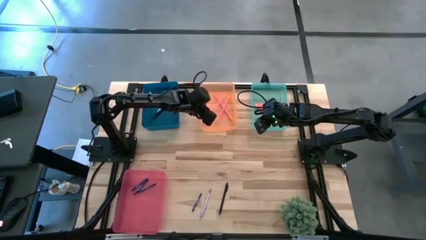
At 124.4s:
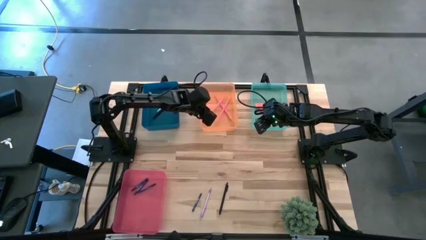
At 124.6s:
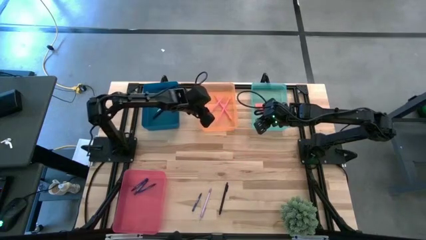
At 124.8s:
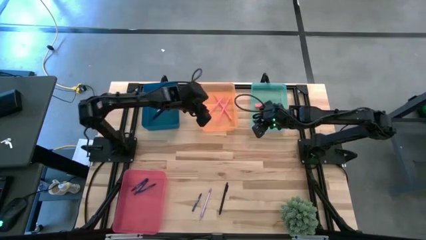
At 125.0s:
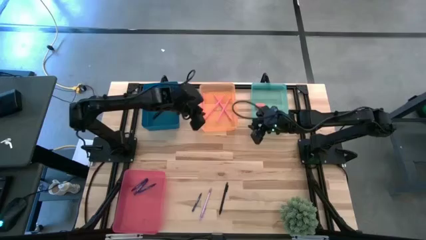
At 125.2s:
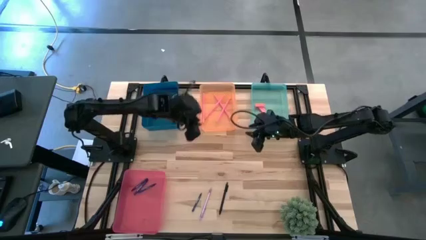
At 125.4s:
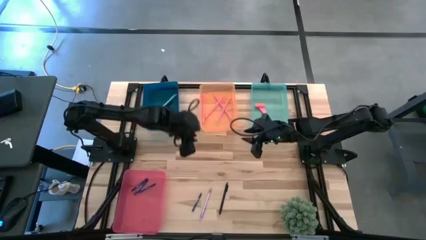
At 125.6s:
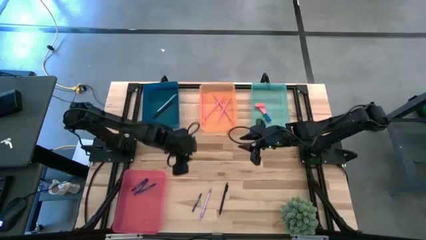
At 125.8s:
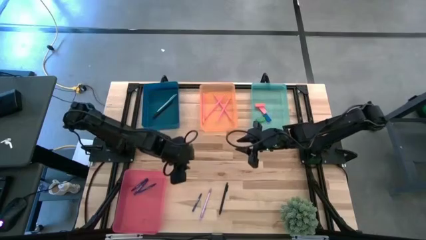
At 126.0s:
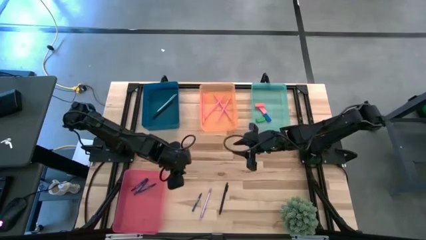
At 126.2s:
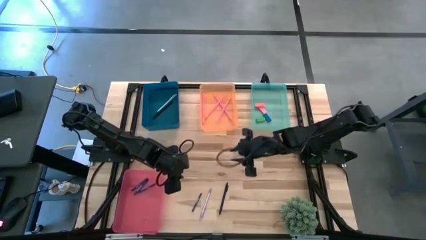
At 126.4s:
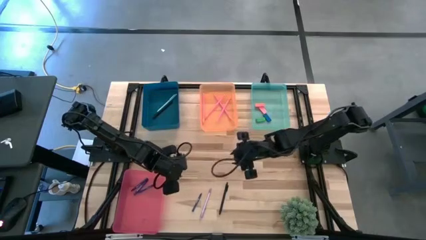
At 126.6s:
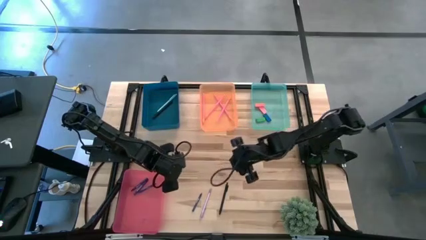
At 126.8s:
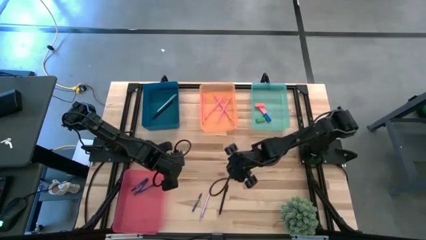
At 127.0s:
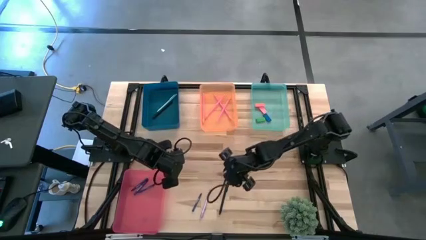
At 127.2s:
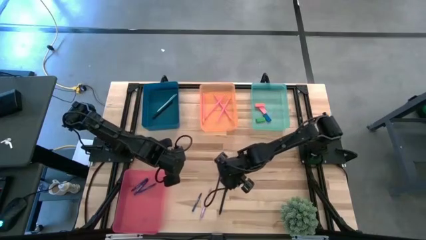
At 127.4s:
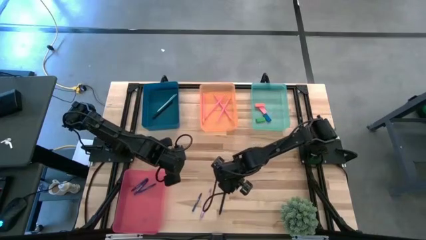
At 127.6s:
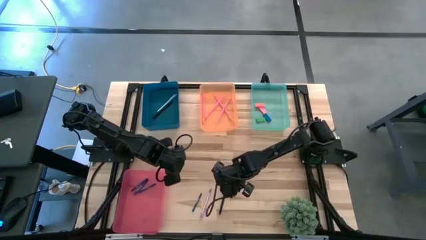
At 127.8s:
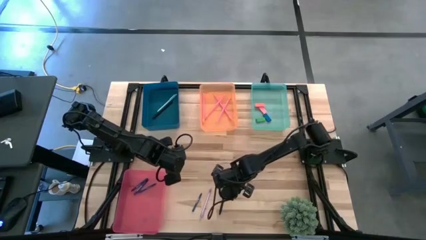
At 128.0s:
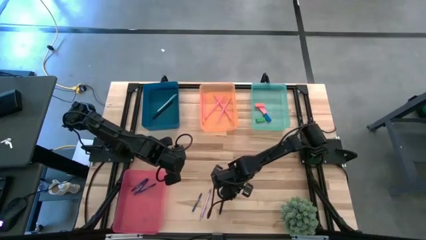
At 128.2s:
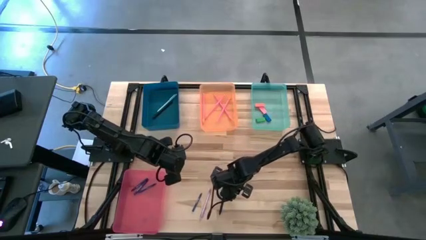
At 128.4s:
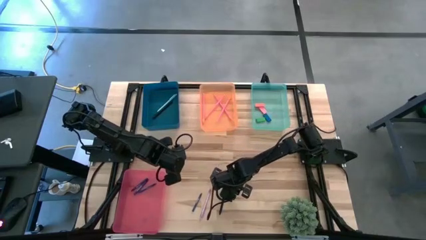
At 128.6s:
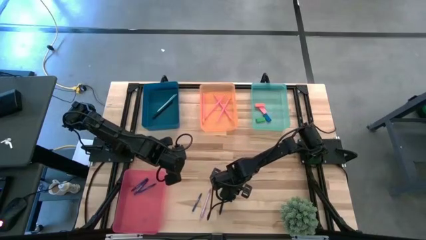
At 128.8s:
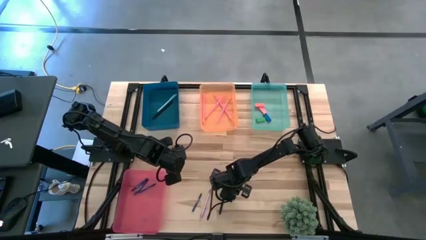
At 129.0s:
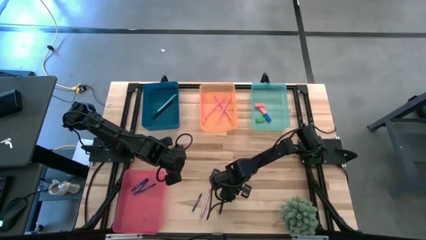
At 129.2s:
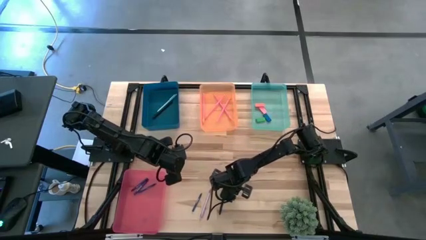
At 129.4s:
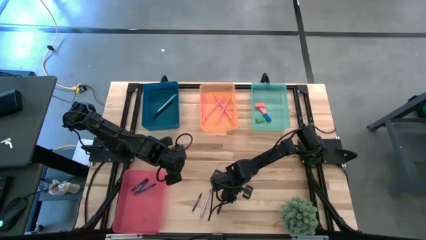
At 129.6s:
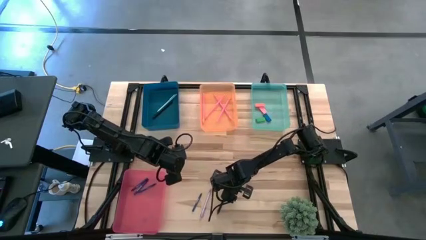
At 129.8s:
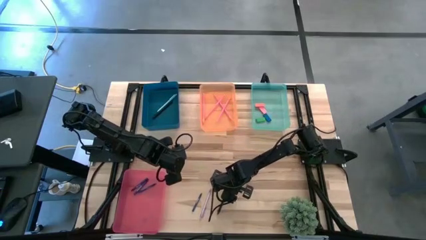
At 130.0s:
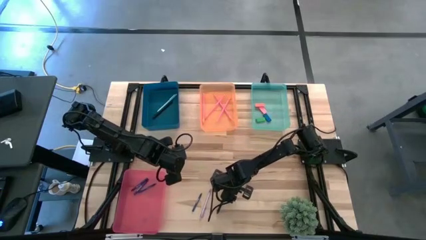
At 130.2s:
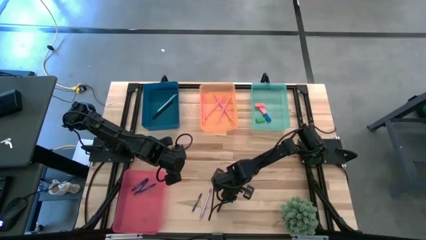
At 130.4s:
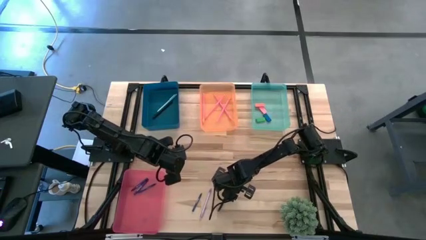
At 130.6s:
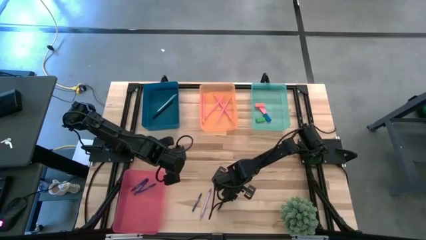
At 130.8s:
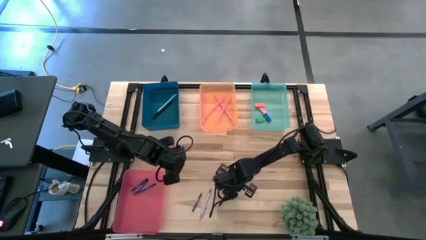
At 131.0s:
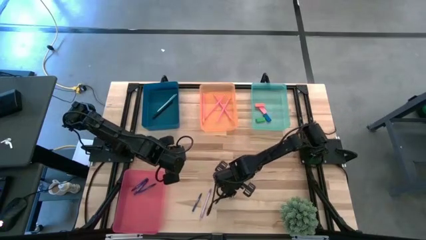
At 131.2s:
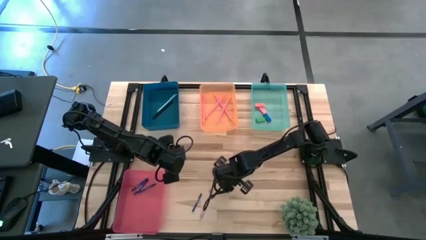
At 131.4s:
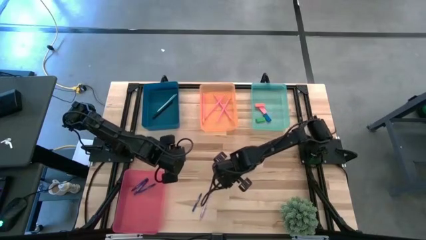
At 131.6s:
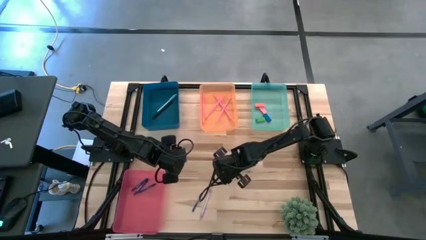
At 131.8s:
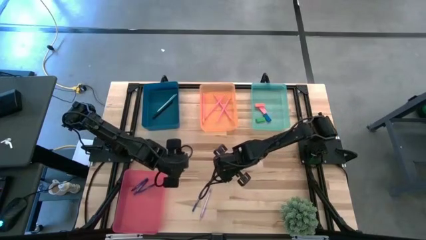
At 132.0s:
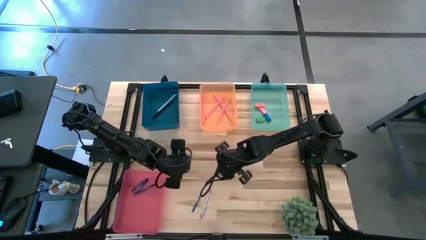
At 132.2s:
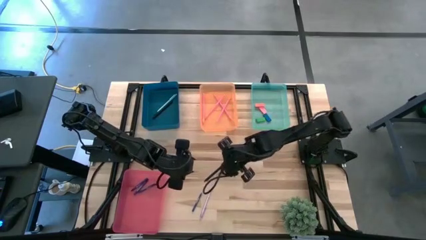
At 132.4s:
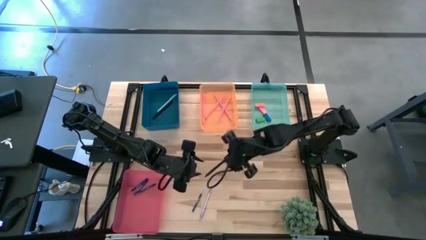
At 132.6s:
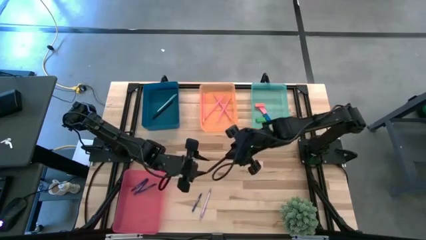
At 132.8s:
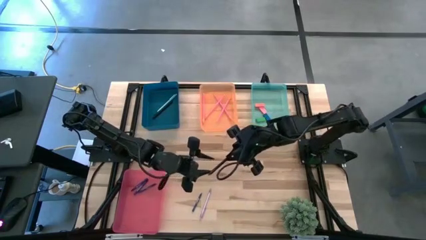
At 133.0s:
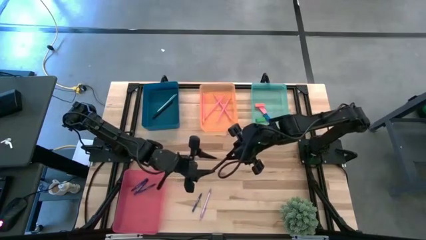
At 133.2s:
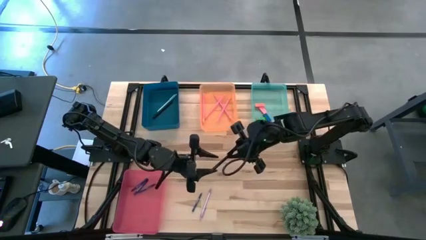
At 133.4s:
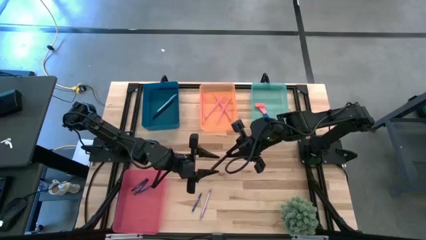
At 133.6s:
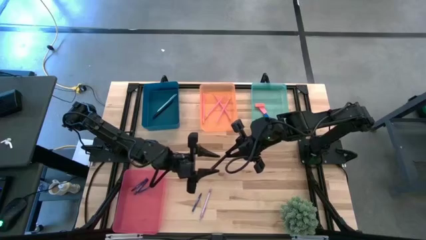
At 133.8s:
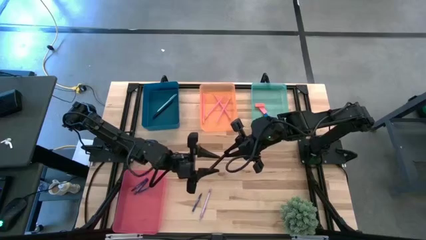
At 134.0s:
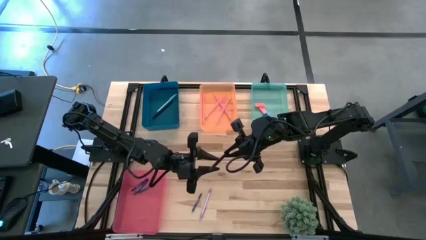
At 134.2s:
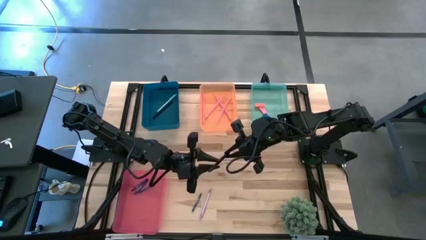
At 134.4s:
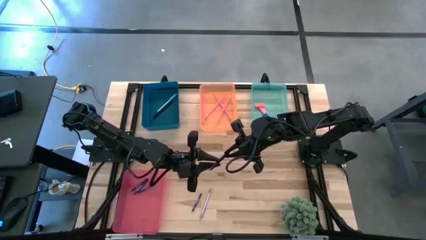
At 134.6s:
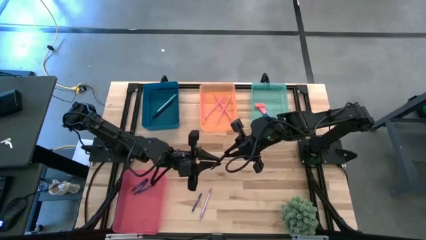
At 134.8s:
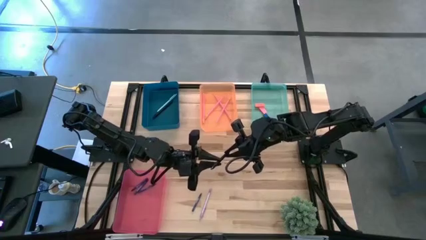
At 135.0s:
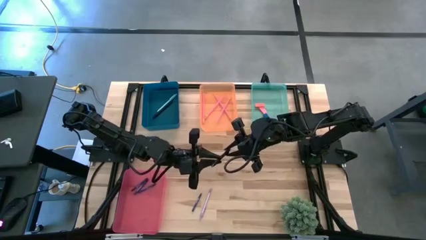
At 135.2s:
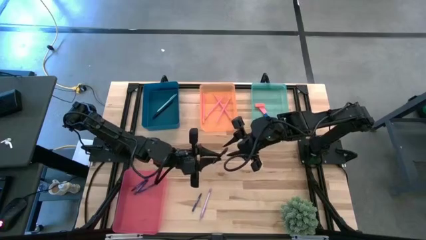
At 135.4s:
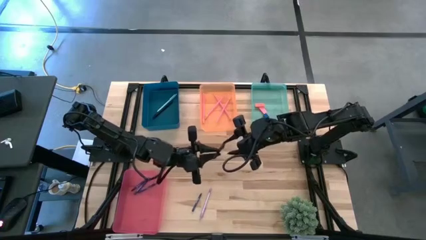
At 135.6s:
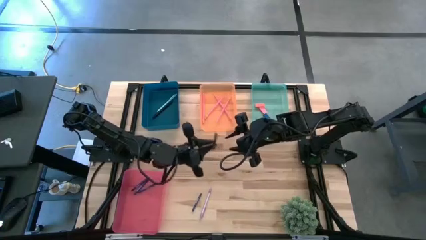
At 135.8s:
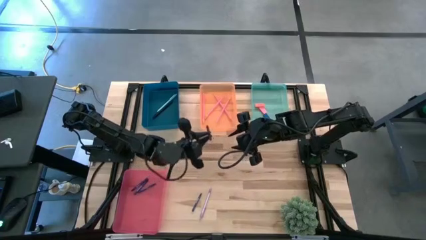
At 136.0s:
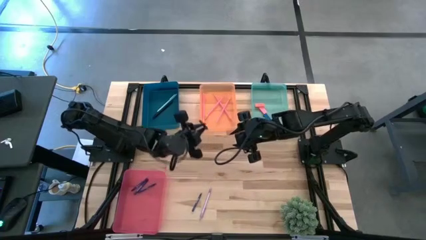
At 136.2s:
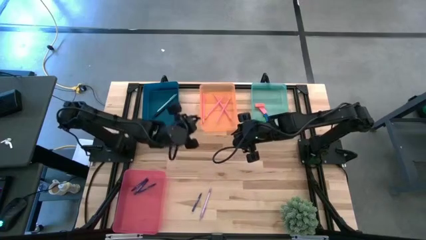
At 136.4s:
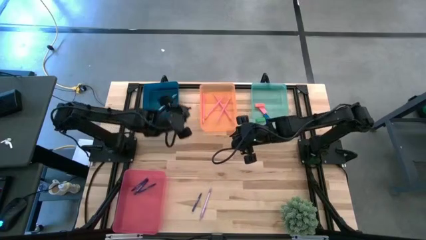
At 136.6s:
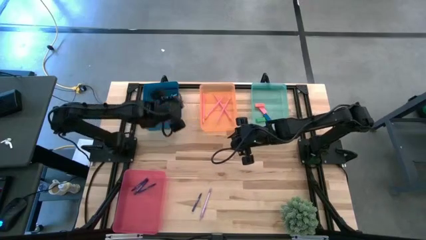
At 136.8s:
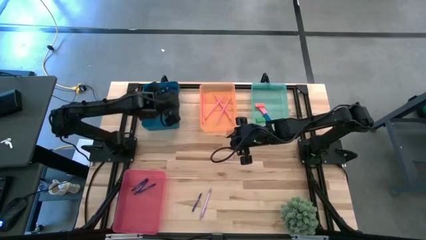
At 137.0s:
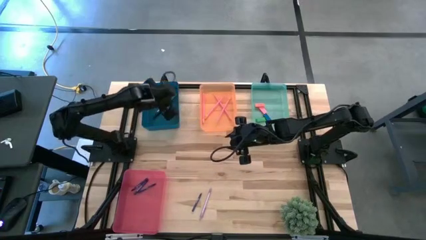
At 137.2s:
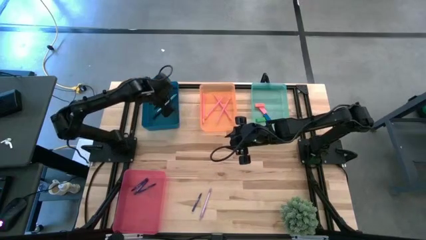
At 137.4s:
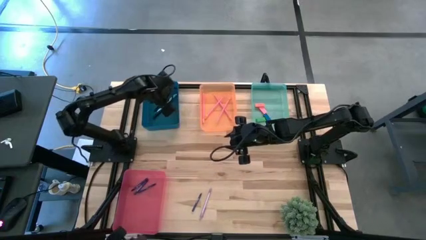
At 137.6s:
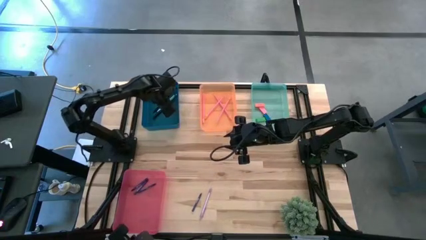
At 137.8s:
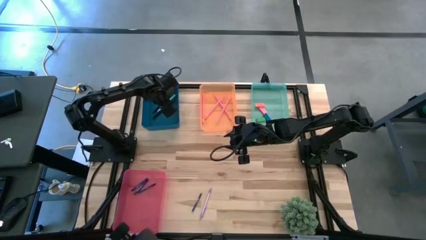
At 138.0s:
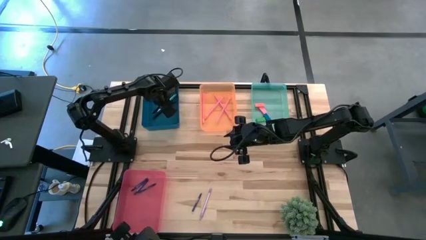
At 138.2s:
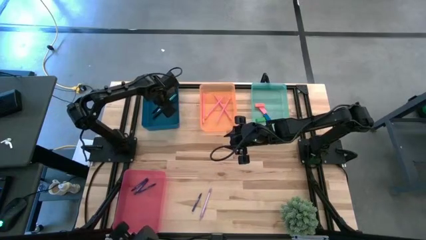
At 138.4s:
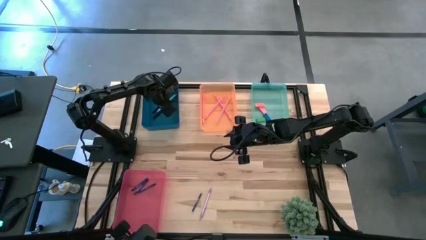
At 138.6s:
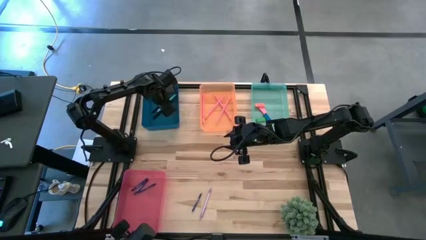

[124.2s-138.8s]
Task: Sort crayons/erasers/pens/pencils in bins
Put the black pen into the blue bin

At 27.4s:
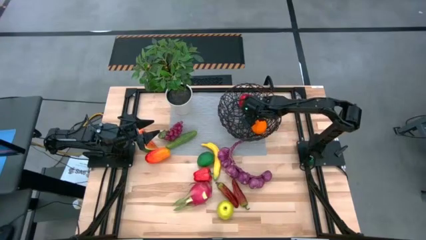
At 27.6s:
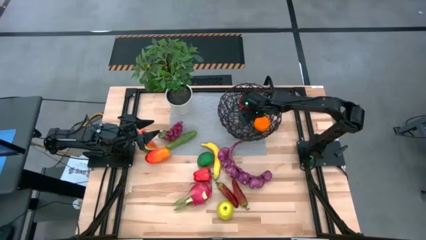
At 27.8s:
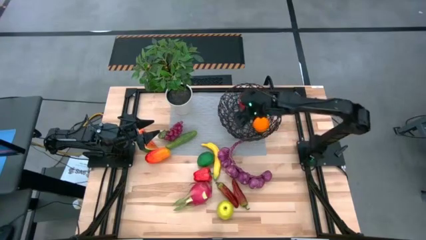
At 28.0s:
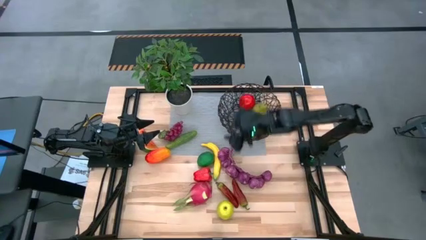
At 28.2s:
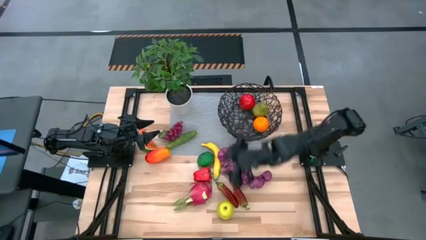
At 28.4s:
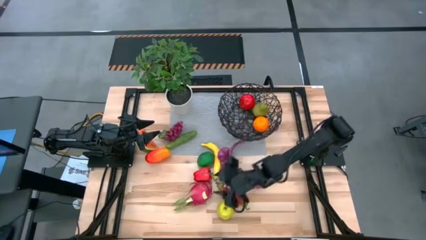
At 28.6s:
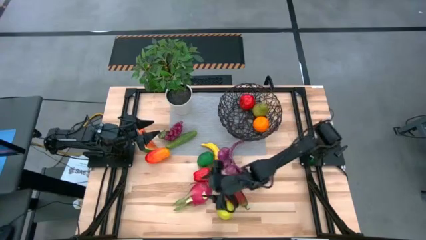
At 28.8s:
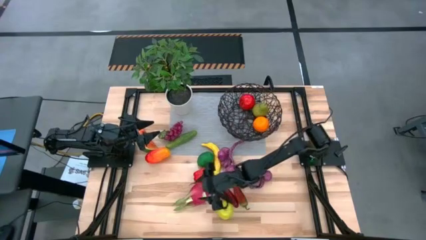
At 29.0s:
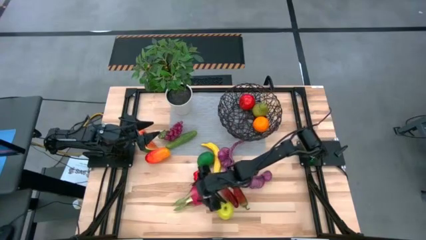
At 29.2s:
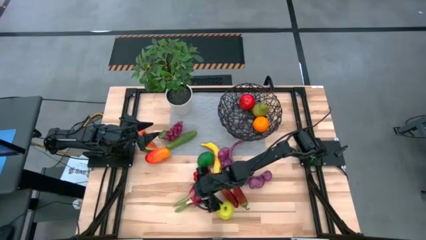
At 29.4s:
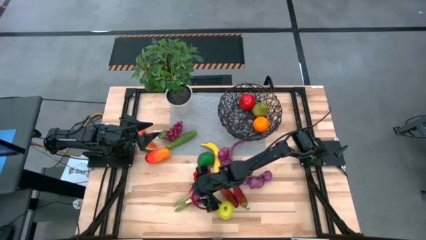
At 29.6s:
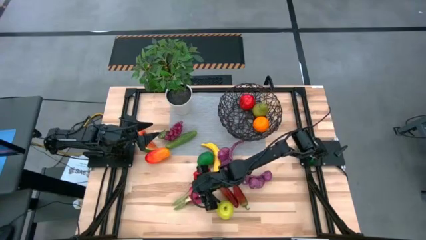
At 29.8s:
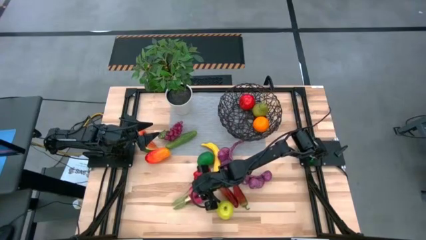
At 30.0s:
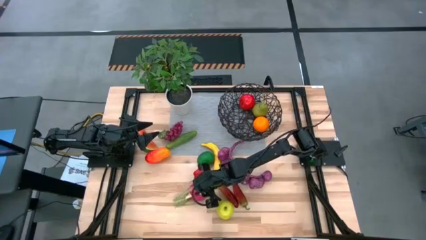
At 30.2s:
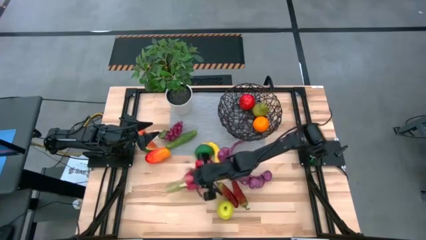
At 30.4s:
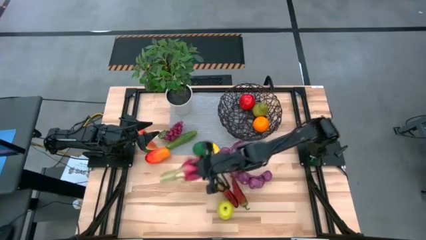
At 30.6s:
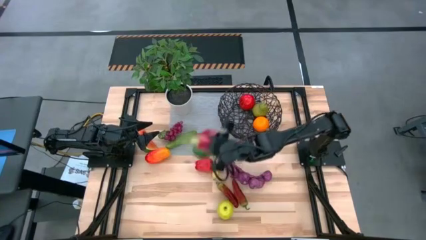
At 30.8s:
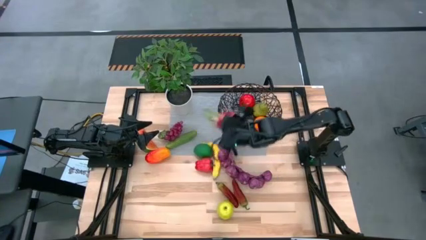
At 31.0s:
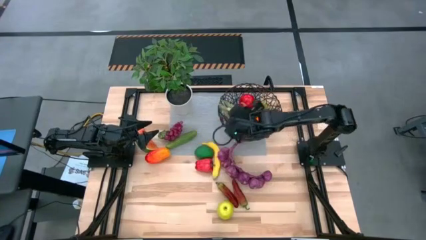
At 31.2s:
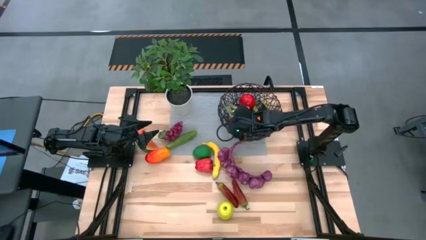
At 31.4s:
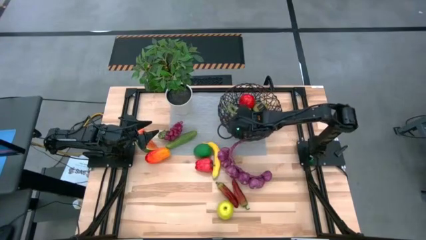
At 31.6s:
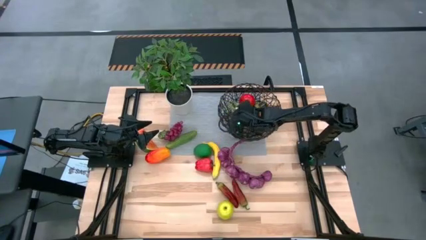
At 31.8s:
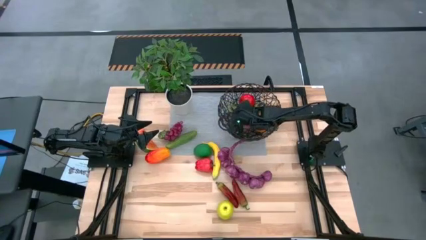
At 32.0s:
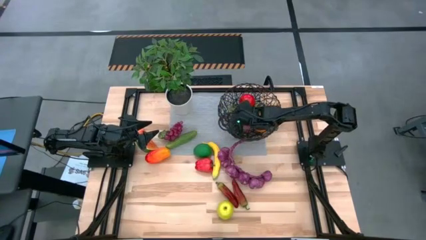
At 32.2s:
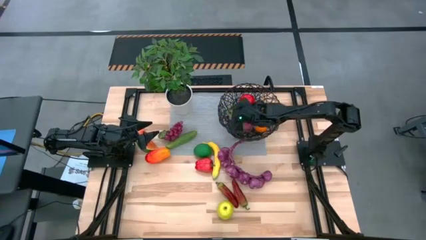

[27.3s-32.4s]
Task: Build produce basket
Put the dragon fruit into the wire basket
